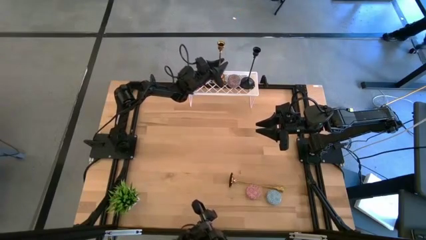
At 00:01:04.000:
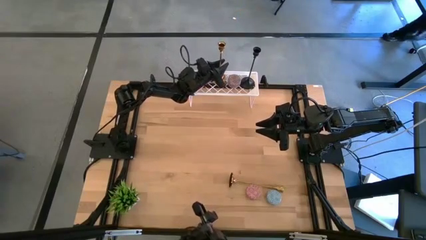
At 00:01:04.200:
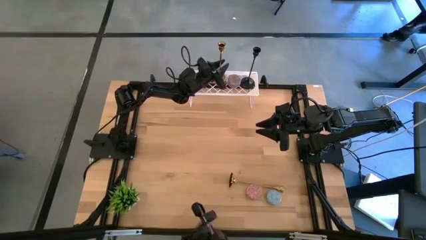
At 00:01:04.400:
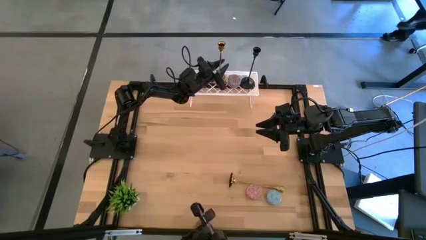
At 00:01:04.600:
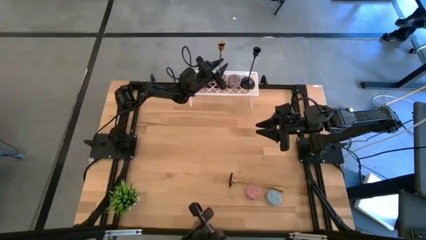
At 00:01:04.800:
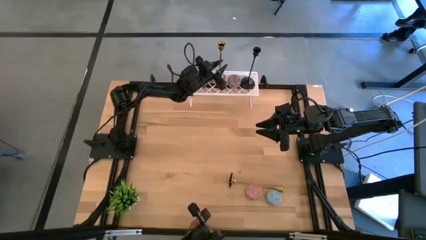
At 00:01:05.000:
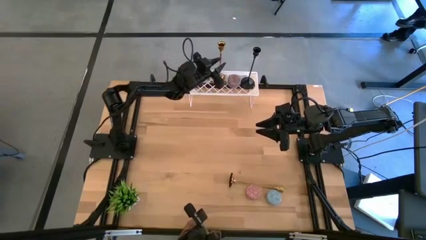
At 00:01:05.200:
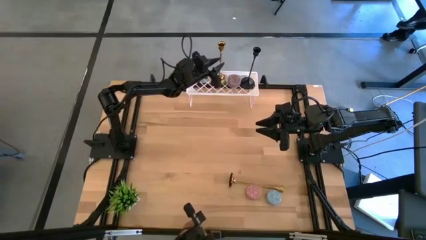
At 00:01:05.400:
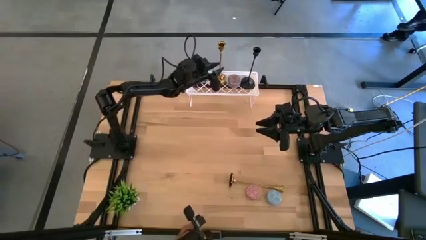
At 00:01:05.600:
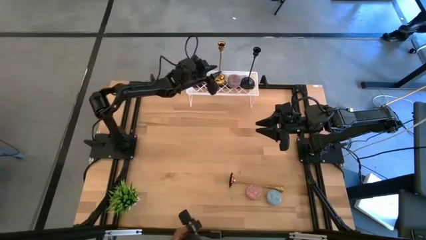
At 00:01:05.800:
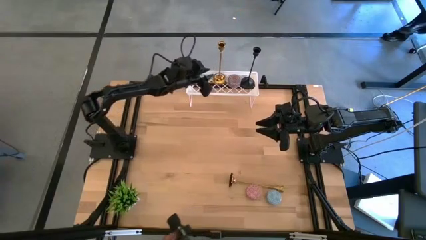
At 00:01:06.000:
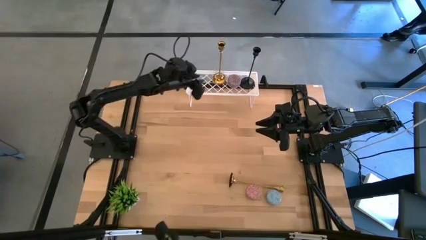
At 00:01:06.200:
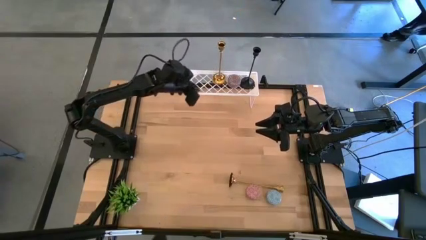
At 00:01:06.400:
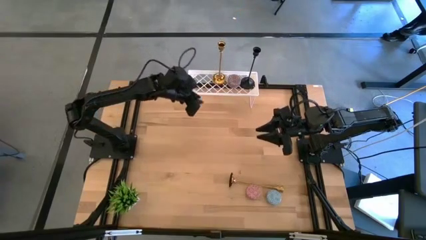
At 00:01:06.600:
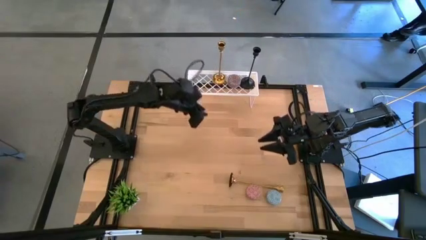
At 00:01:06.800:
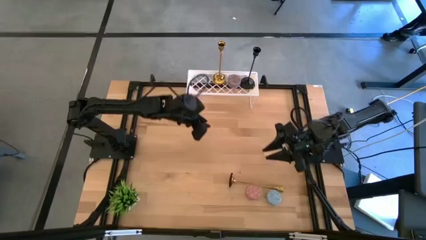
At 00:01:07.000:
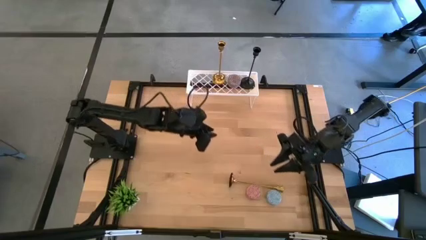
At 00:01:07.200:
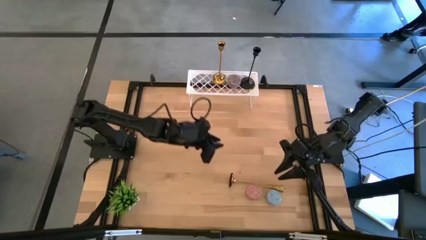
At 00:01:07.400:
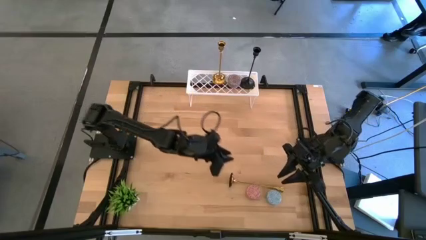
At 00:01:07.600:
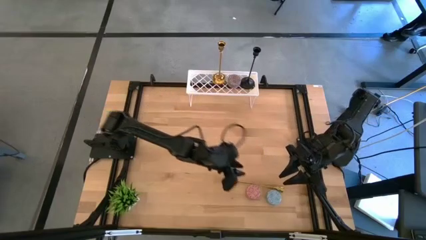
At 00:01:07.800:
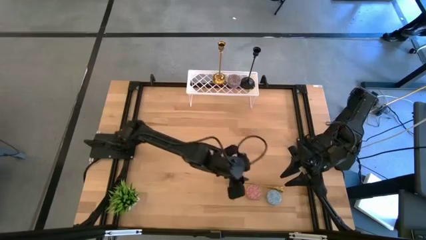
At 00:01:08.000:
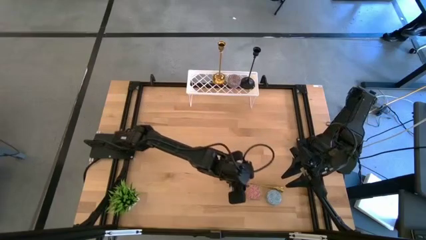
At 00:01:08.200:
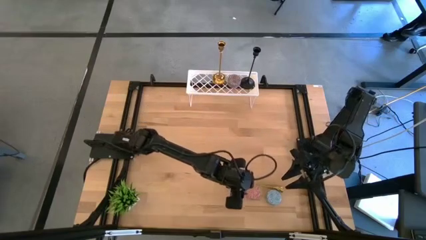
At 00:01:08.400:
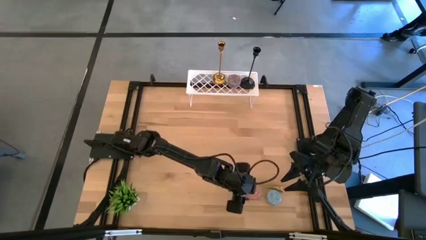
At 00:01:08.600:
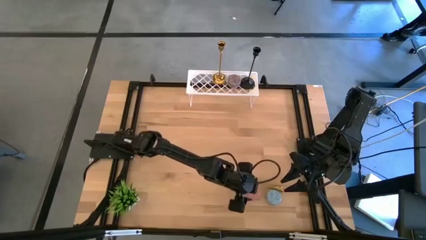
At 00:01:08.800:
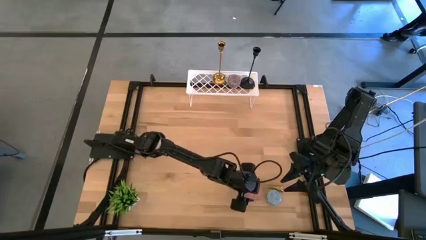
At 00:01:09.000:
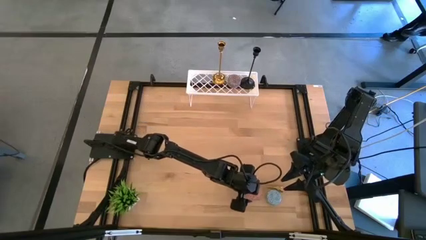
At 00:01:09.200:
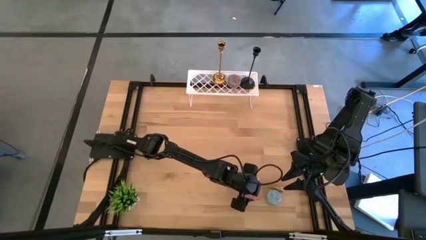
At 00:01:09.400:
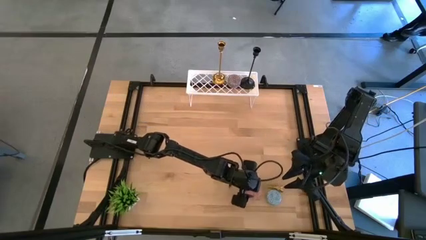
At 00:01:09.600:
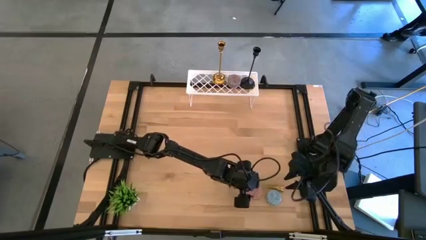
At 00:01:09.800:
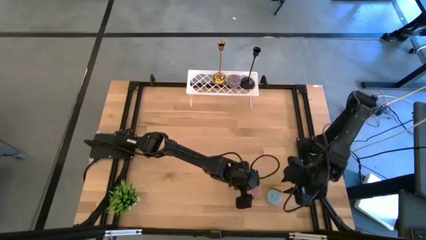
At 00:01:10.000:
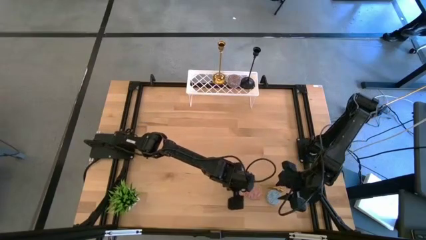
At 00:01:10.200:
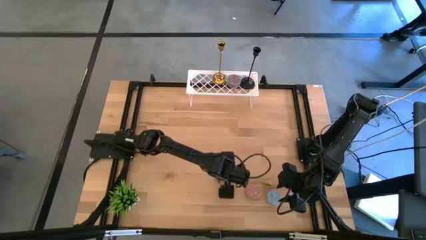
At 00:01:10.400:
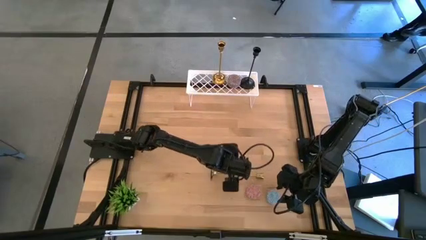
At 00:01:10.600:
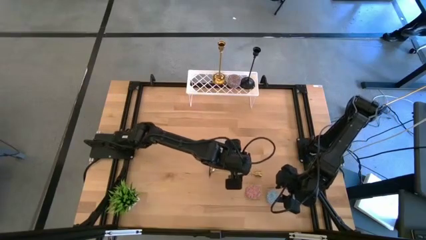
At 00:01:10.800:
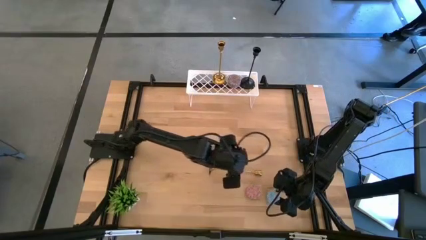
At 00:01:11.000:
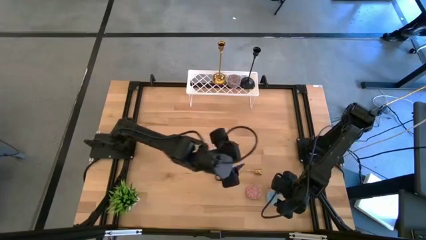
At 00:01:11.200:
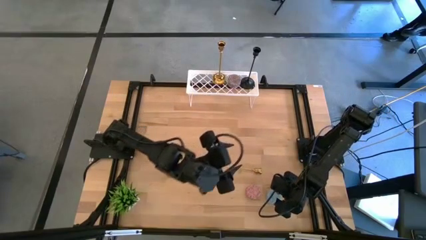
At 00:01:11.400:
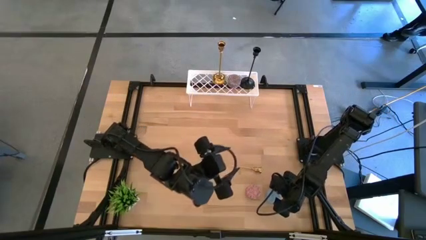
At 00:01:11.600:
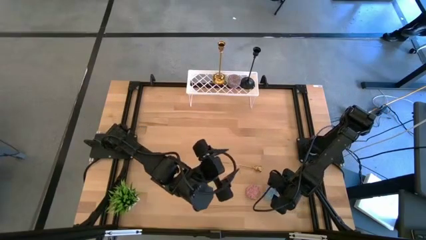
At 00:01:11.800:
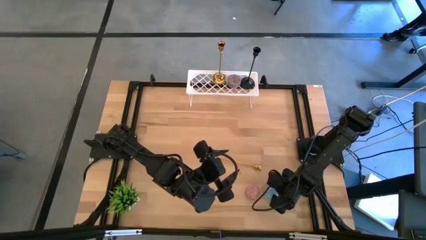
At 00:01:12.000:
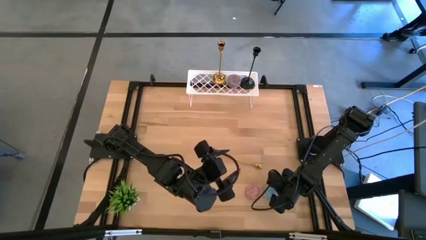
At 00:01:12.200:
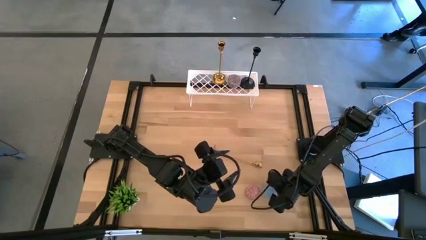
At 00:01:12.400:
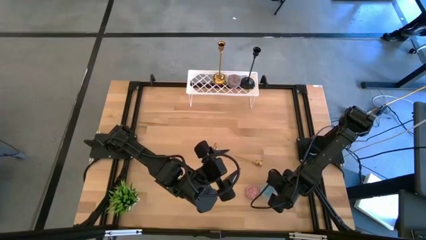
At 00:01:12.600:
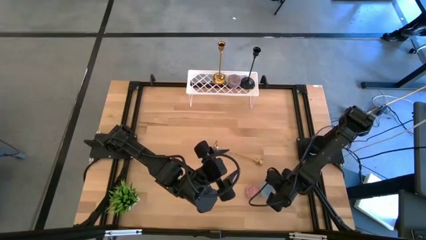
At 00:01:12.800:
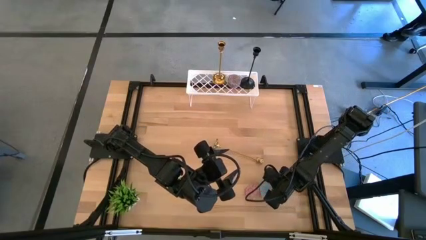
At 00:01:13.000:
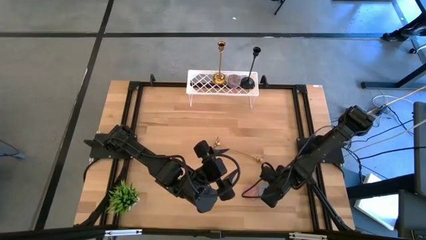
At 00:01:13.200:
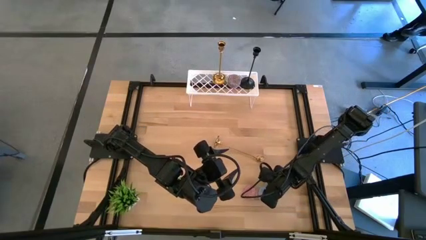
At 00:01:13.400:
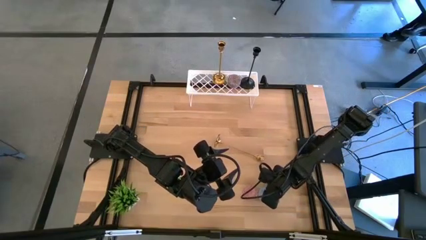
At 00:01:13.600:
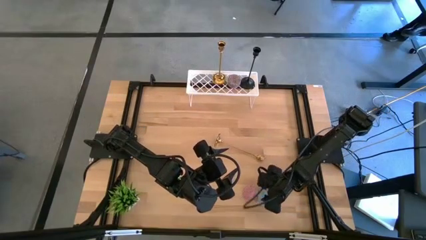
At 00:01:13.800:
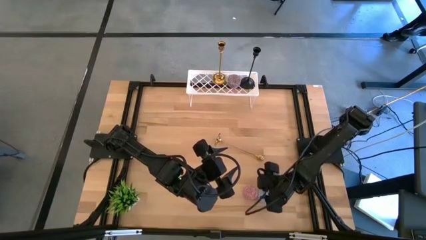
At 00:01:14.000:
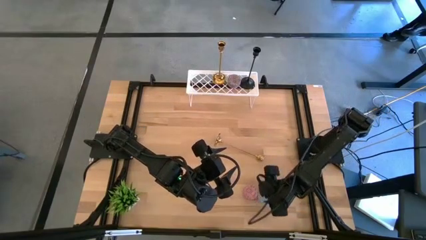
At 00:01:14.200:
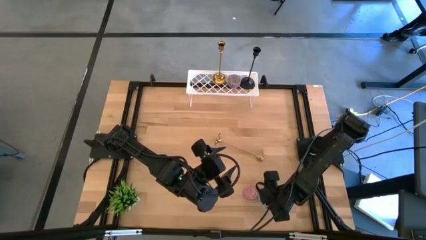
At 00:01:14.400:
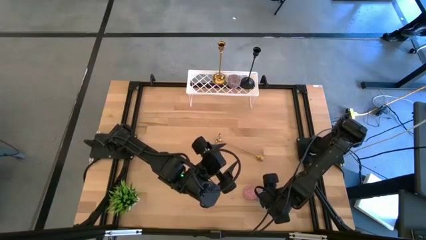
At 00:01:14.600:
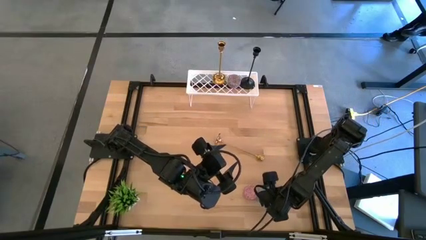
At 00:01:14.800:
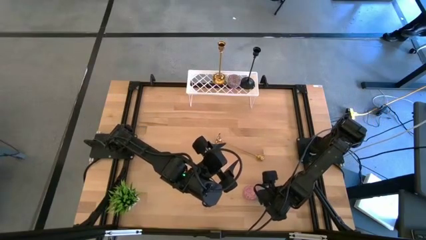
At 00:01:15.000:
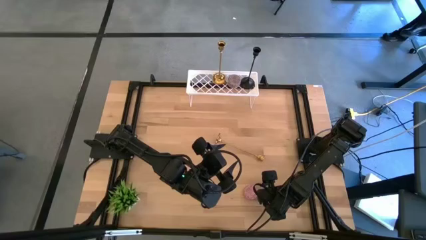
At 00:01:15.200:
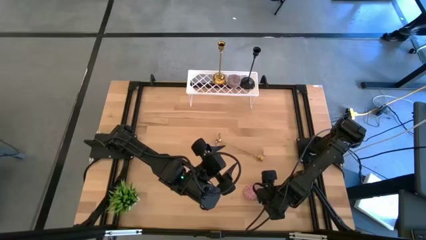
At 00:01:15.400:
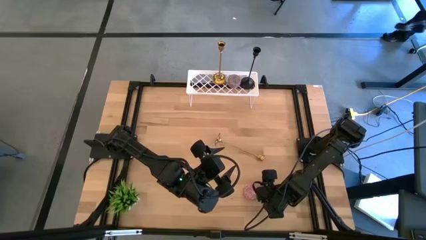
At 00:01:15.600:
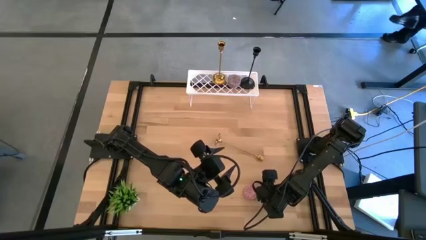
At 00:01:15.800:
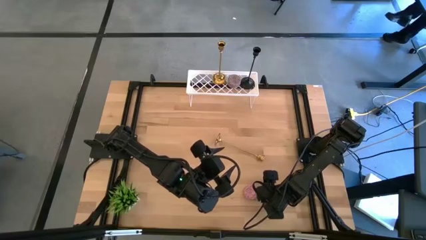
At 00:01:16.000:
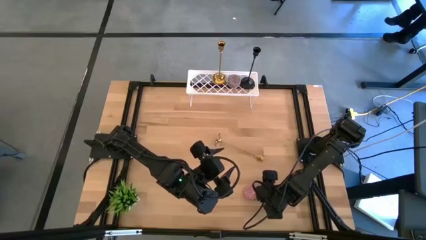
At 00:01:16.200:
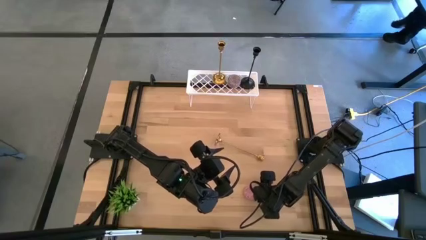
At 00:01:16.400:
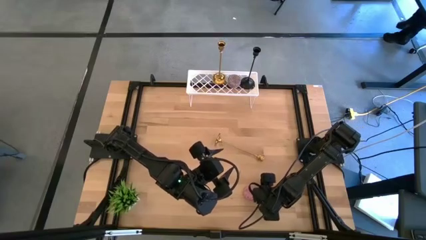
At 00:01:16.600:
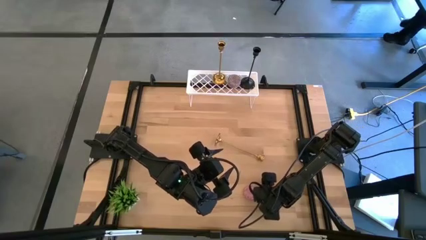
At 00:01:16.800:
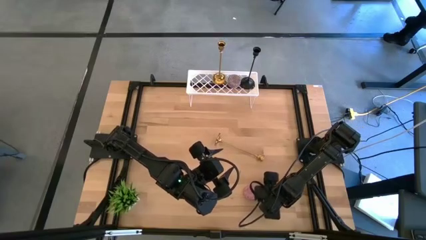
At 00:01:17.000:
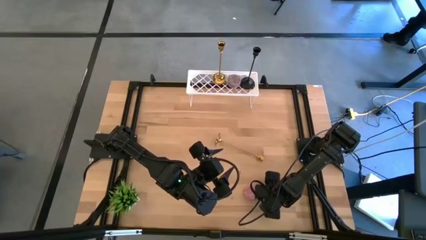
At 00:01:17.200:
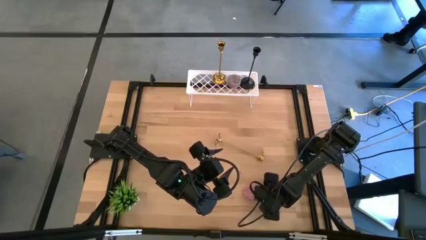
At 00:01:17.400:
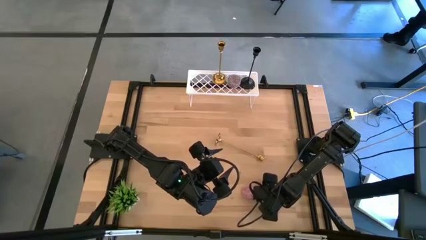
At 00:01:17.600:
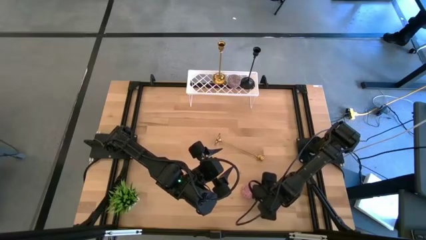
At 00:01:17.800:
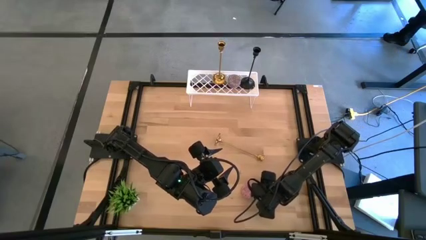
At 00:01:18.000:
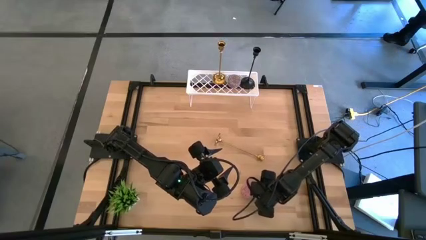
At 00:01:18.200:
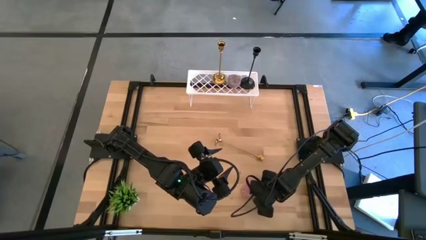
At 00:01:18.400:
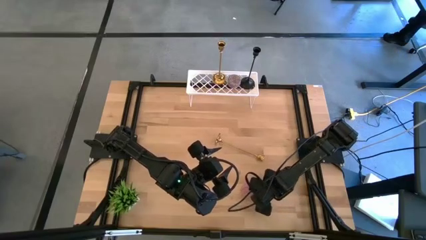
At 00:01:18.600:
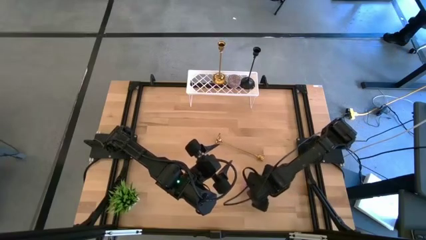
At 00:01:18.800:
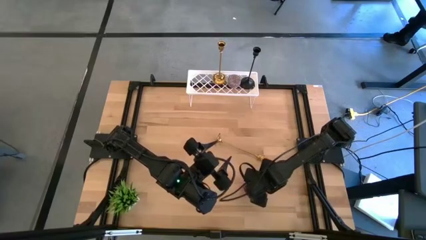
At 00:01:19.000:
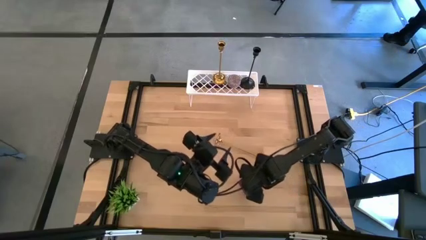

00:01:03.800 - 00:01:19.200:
Task: Pick & Place candle stick holders
Put the blue scented candle on the shelf
